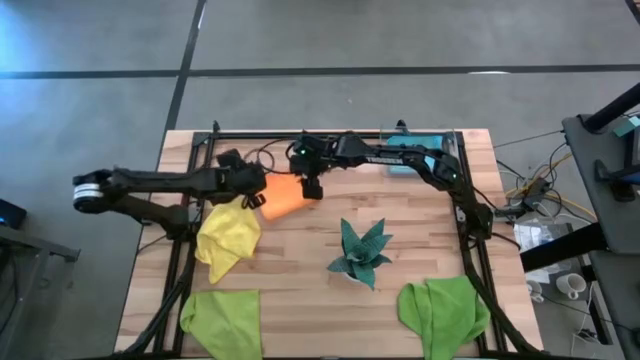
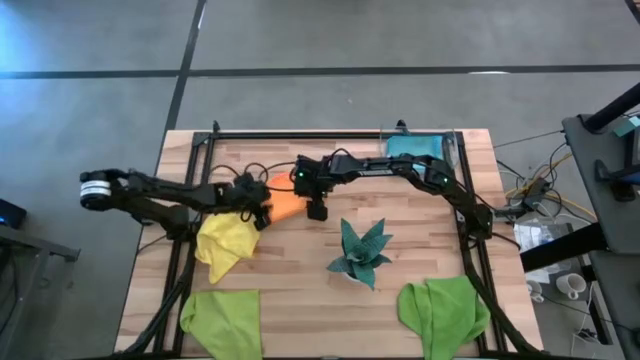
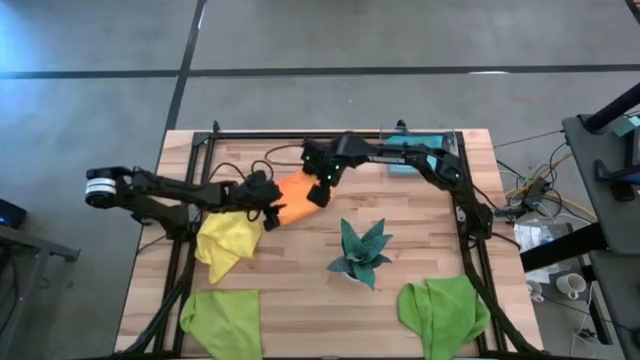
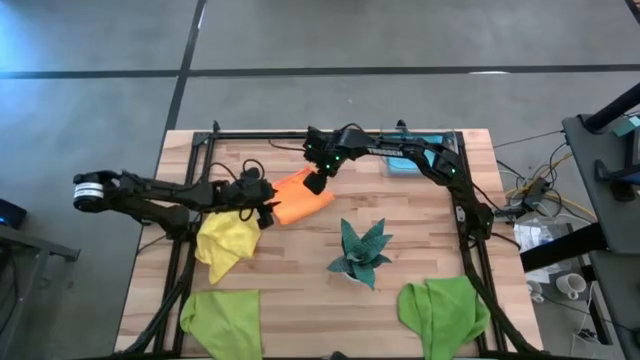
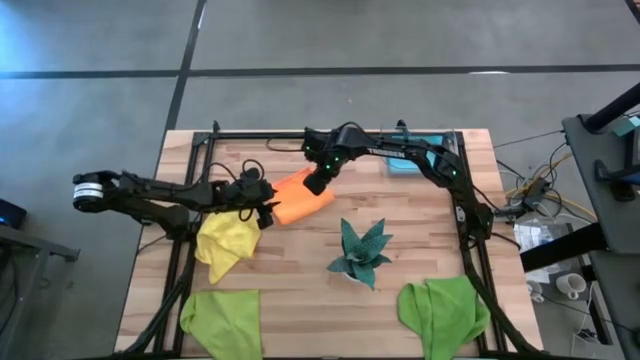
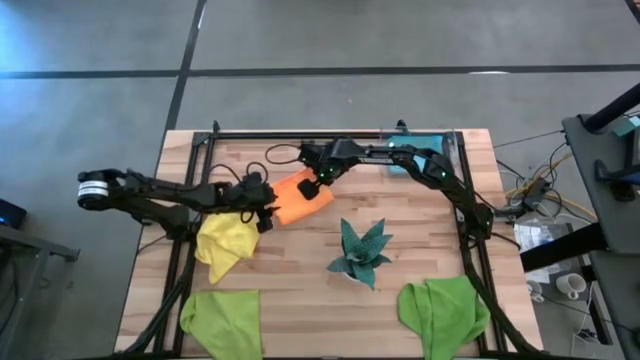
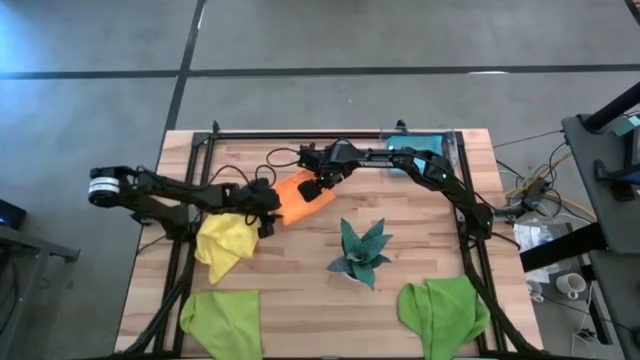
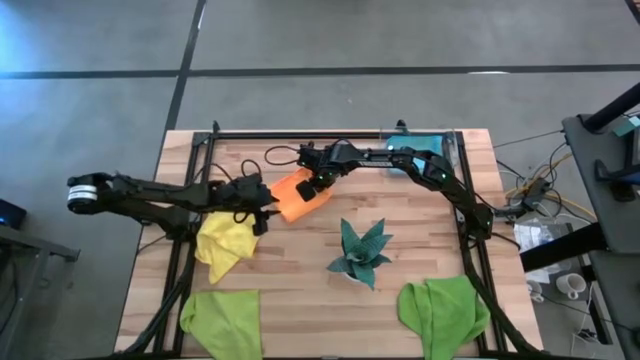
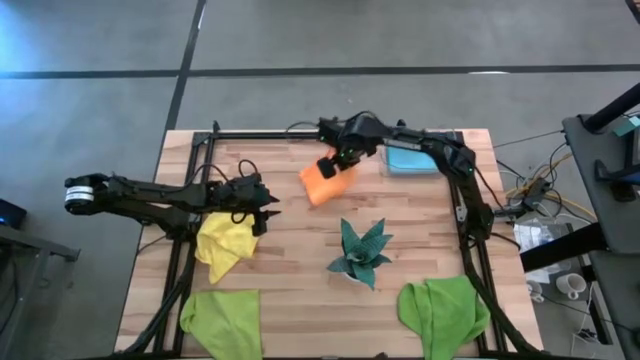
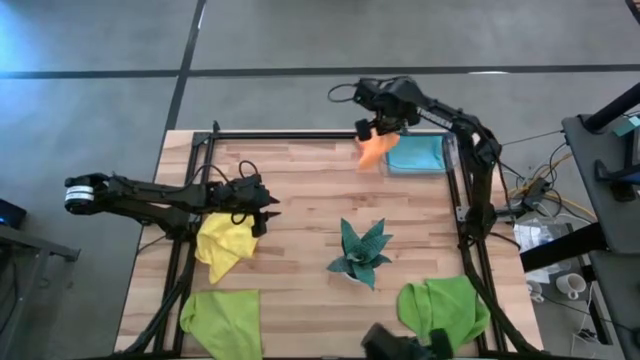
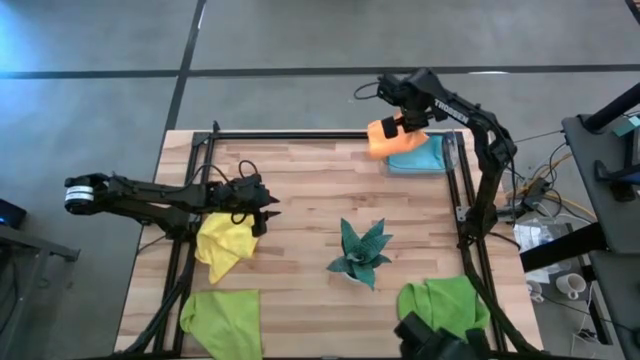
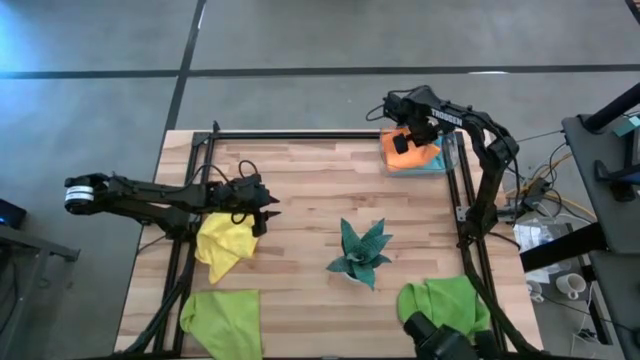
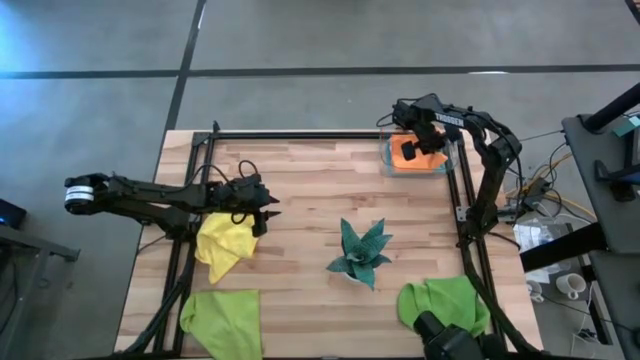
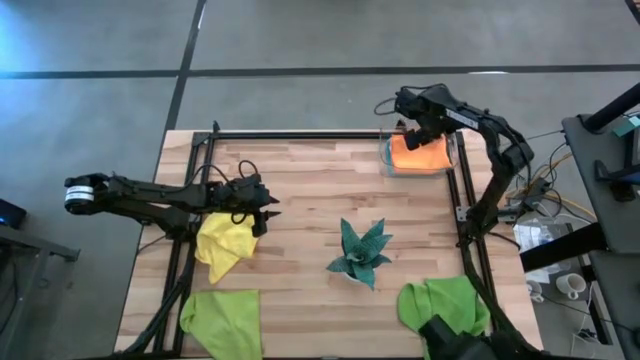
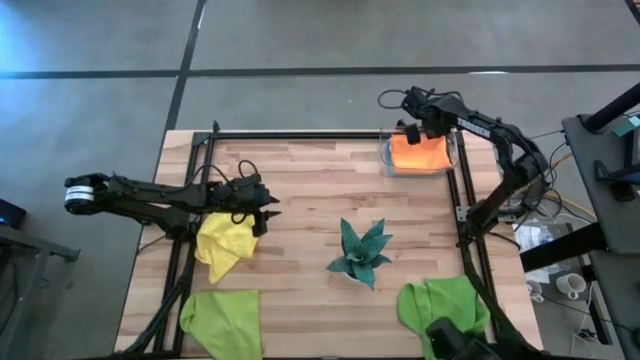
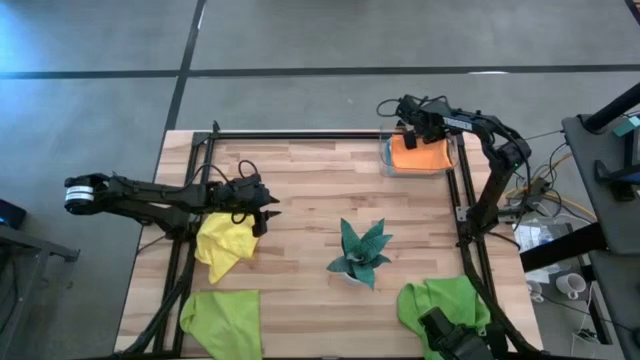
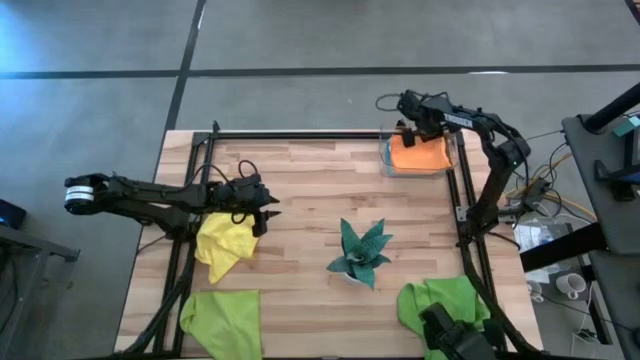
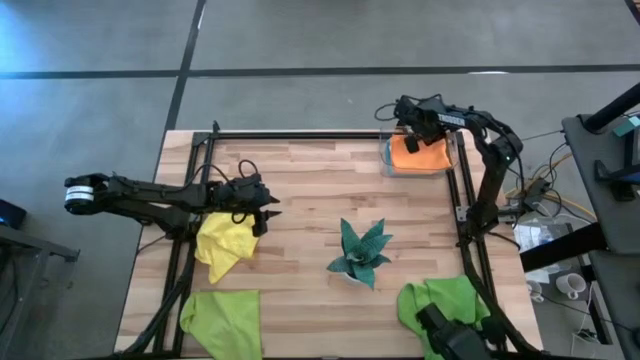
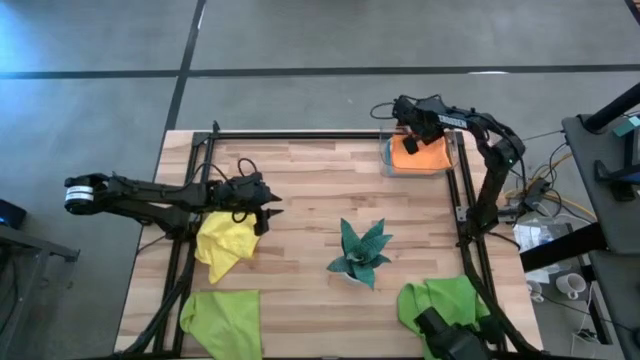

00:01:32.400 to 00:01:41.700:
Task: Fold microfiber towels
Put the orange microfiber cloth into the transparent bin

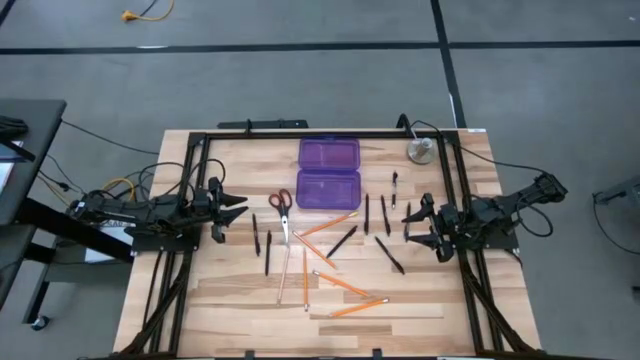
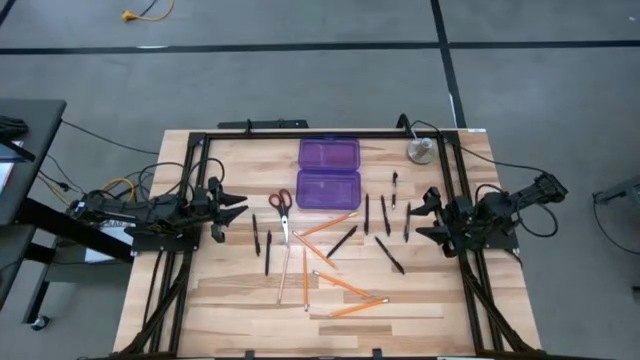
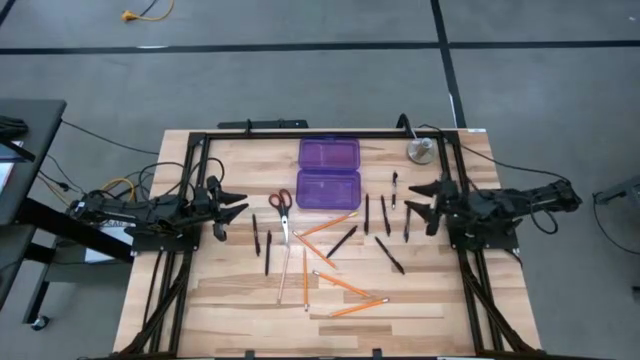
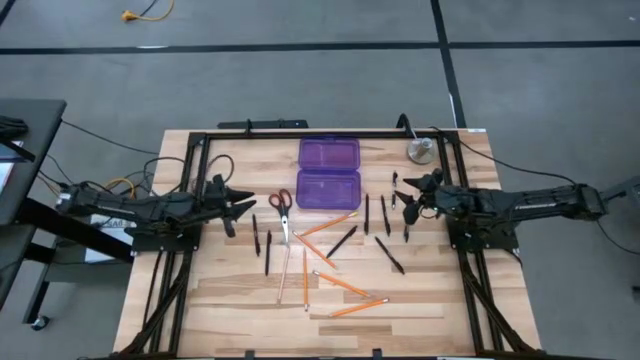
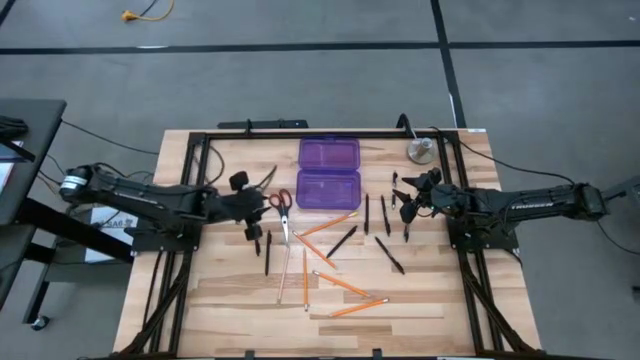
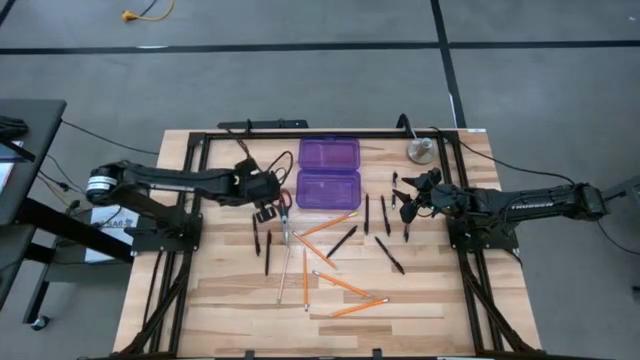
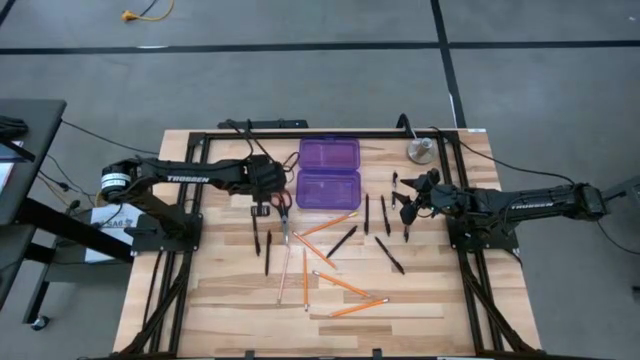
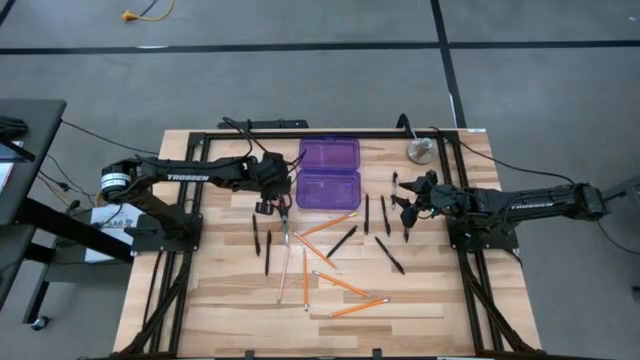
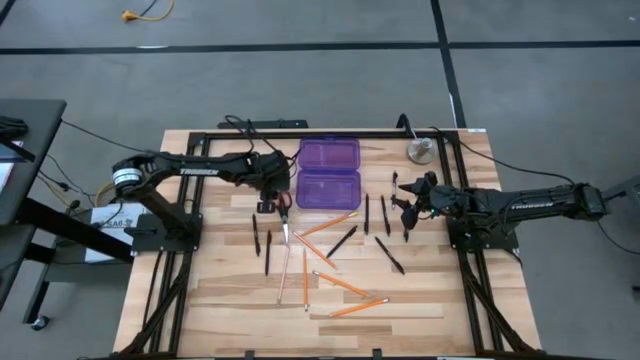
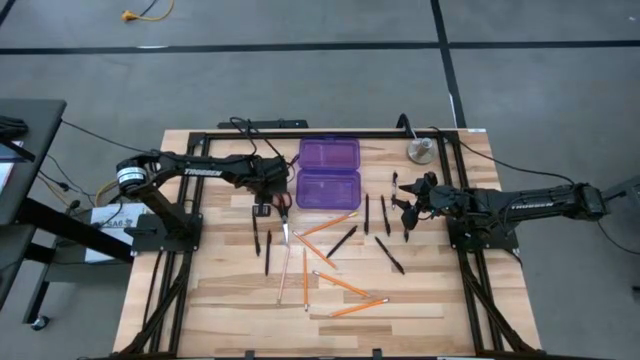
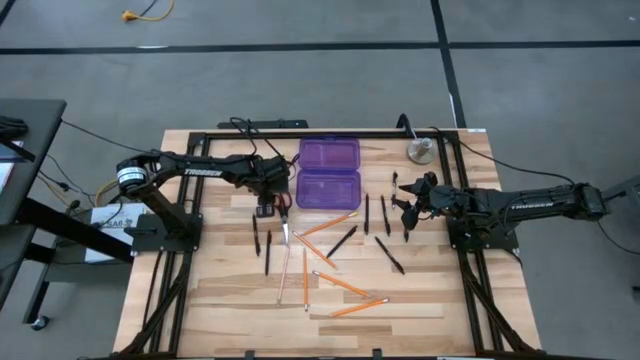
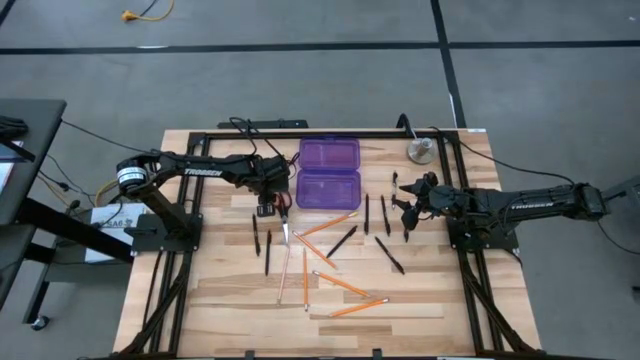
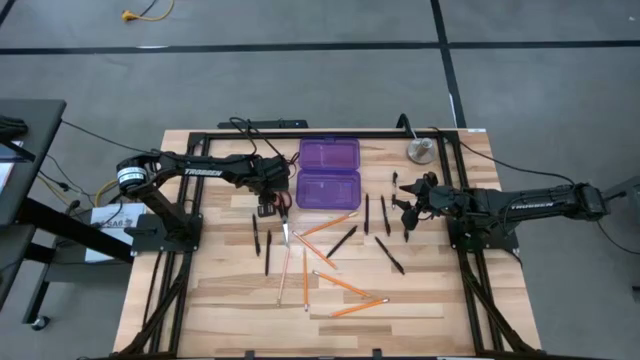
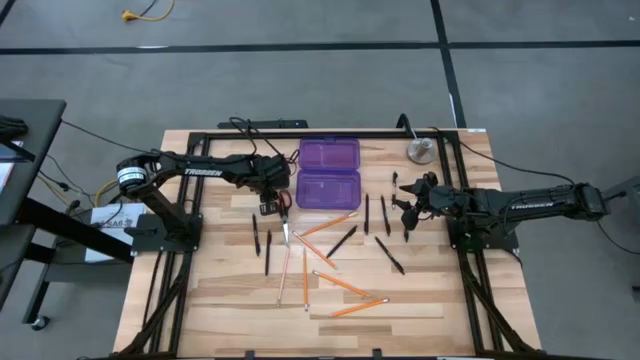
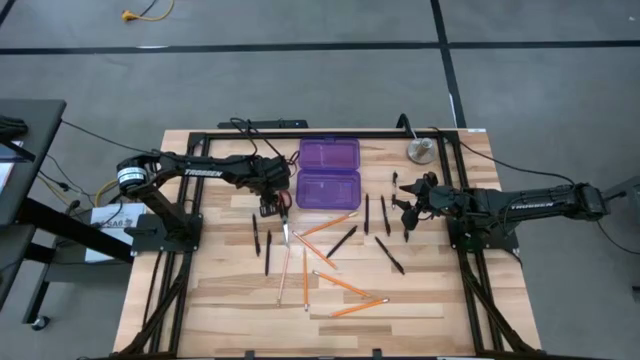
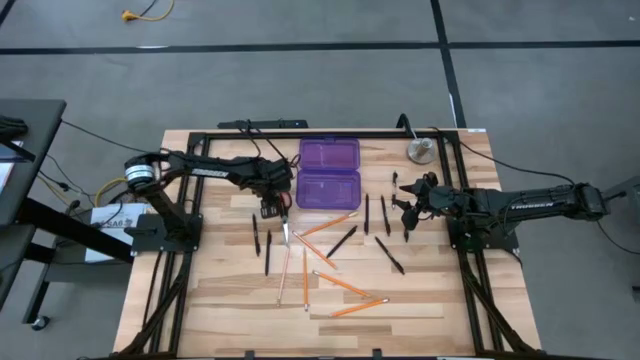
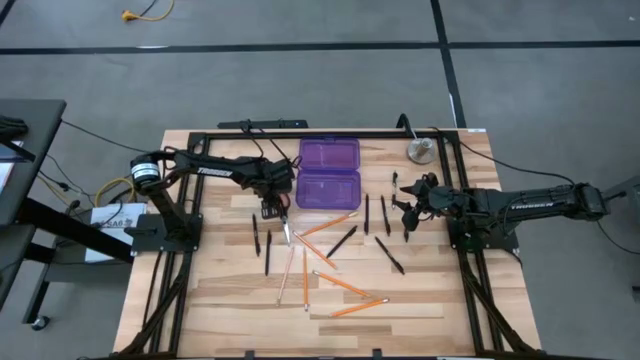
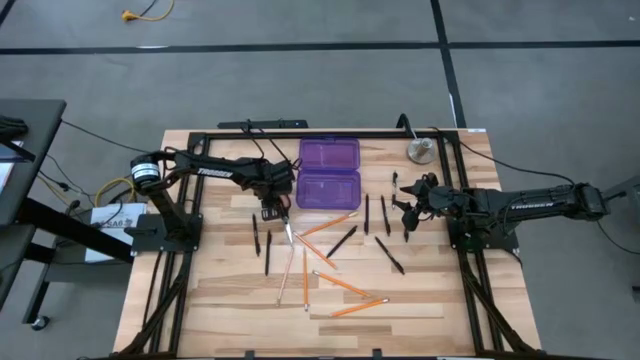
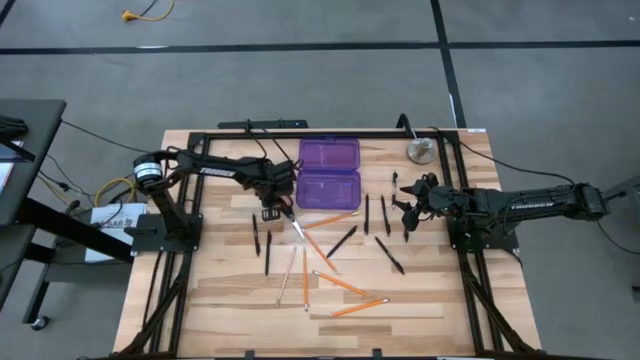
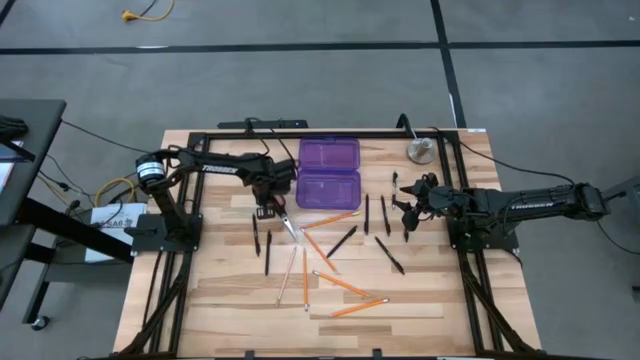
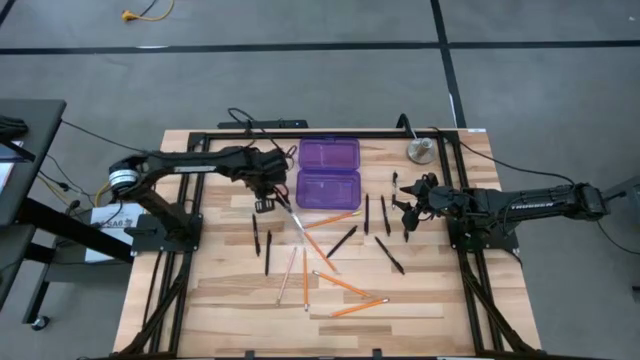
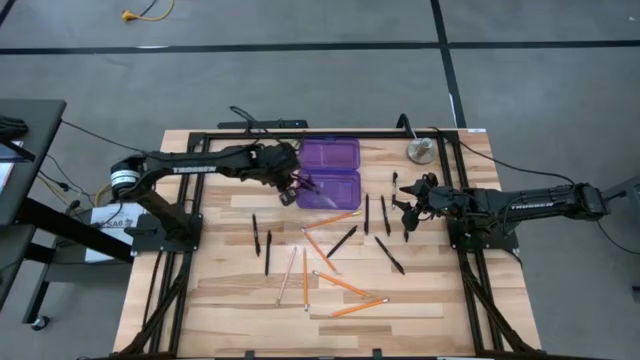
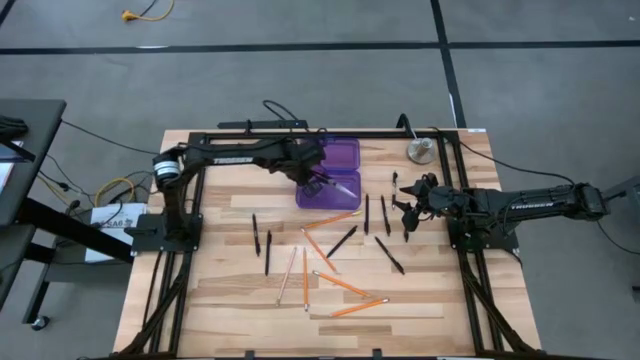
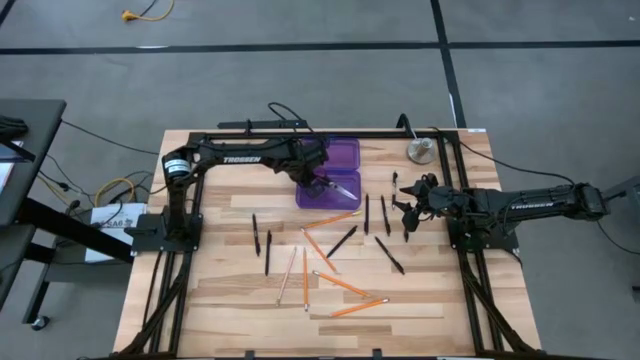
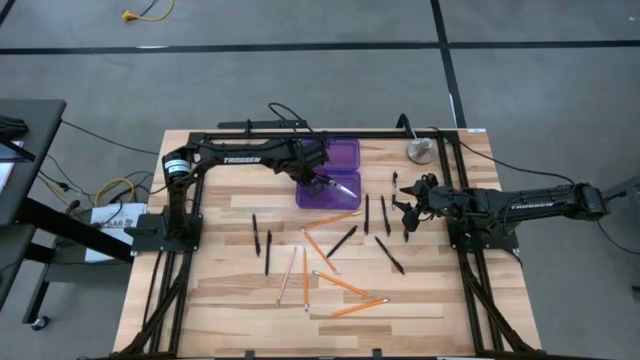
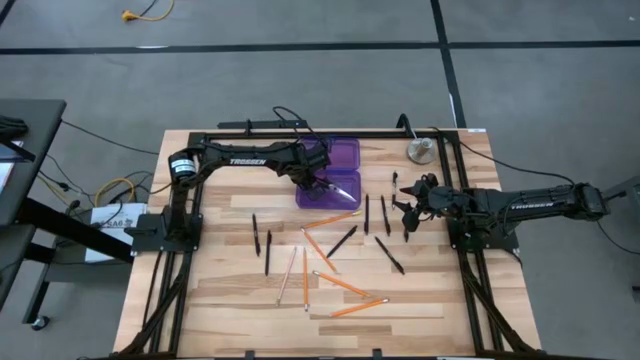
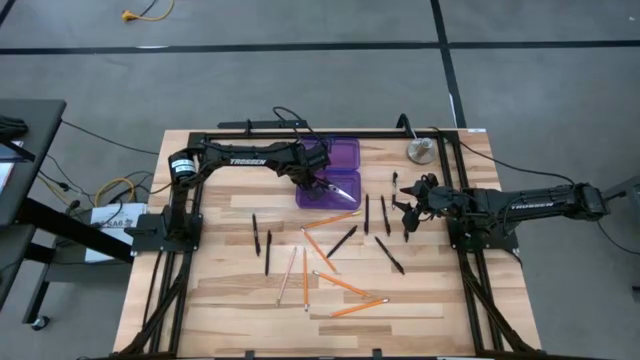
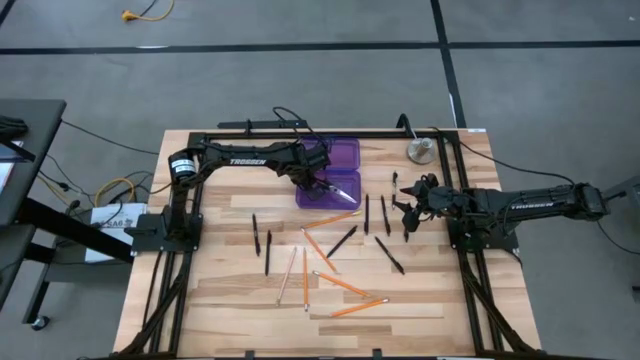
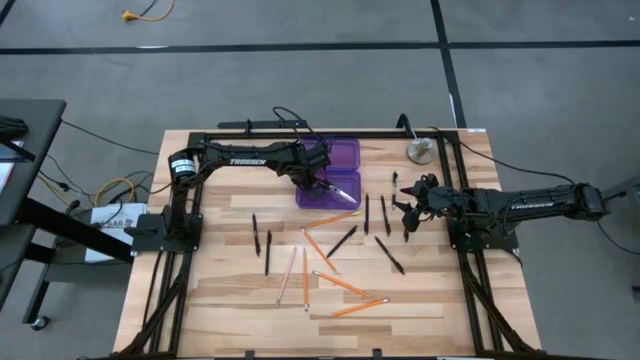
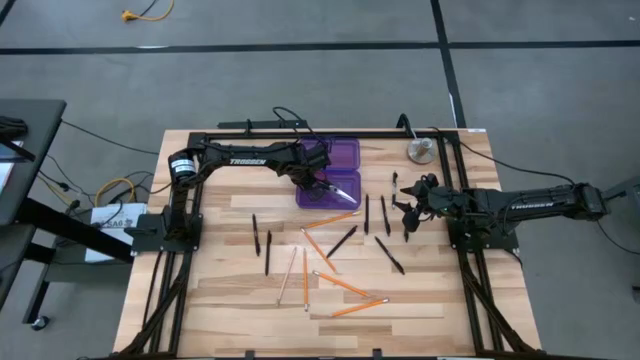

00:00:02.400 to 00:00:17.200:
Task: Pick & place school supplies into a supply box
Put the black scissors into the violet supply box
